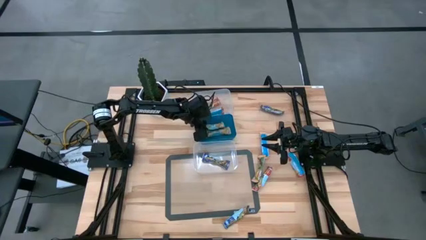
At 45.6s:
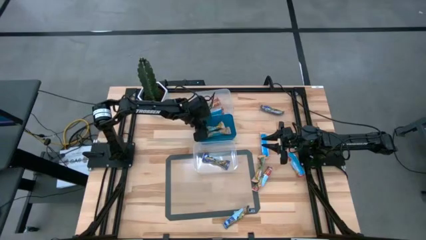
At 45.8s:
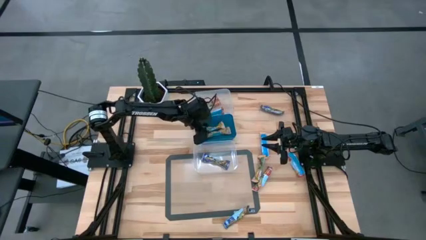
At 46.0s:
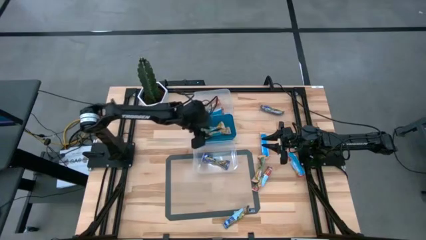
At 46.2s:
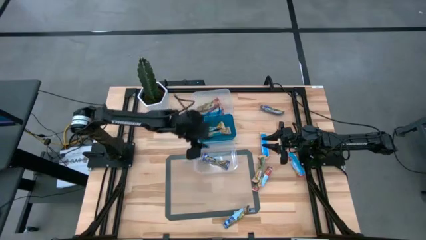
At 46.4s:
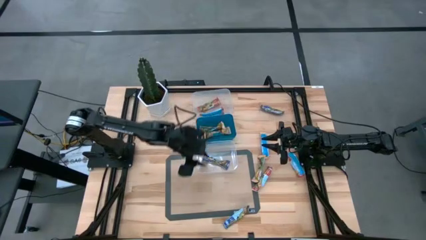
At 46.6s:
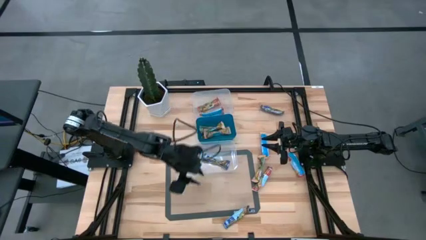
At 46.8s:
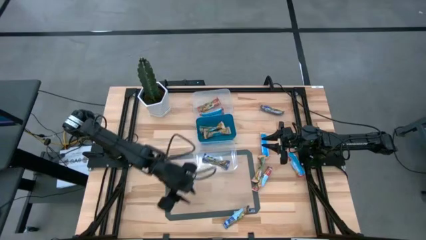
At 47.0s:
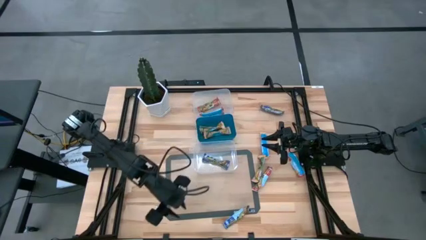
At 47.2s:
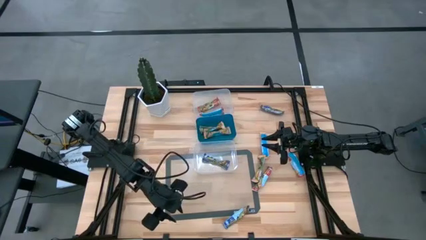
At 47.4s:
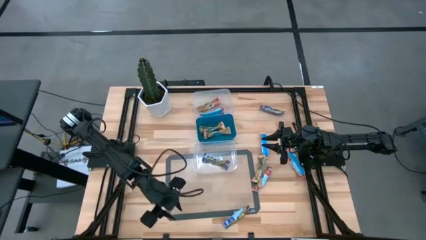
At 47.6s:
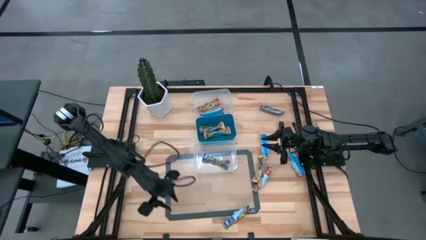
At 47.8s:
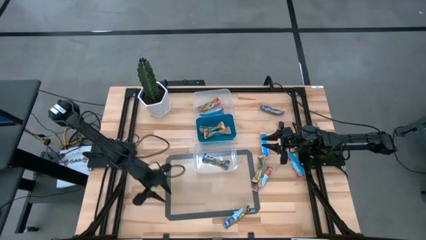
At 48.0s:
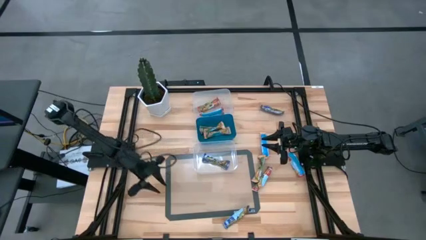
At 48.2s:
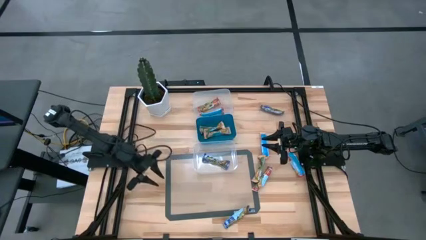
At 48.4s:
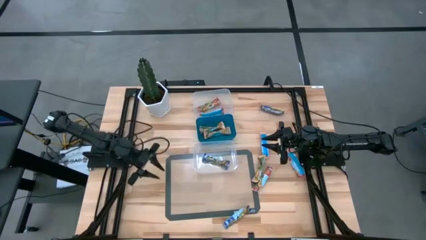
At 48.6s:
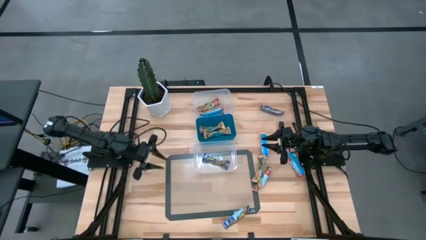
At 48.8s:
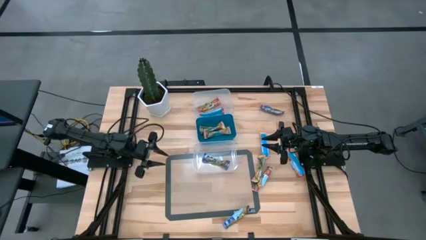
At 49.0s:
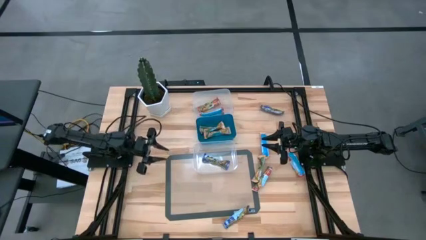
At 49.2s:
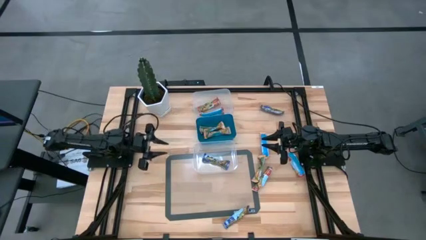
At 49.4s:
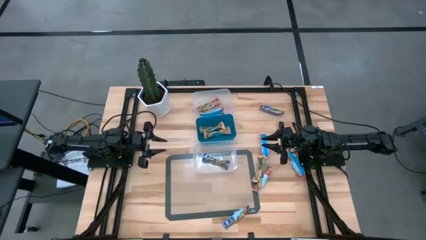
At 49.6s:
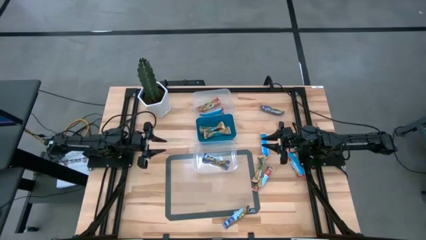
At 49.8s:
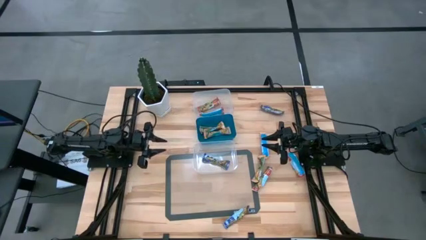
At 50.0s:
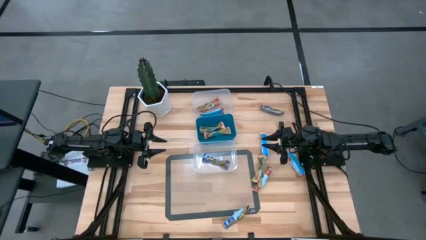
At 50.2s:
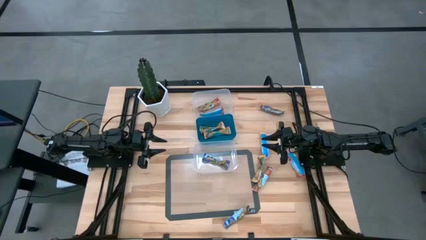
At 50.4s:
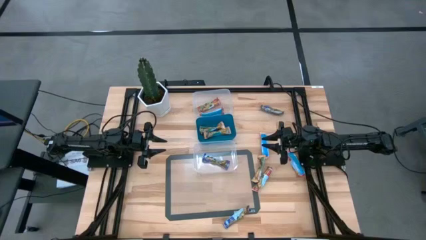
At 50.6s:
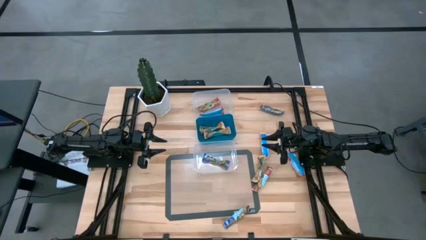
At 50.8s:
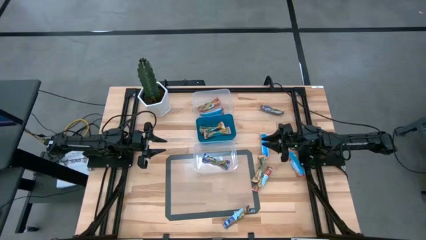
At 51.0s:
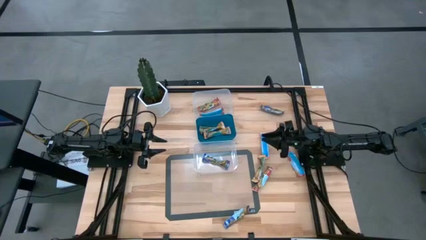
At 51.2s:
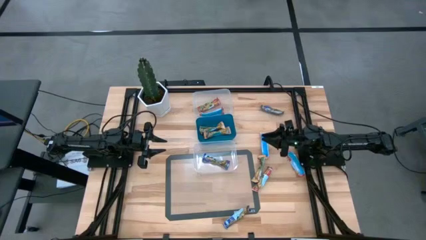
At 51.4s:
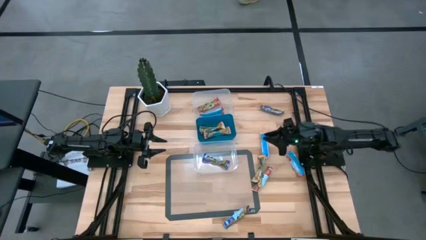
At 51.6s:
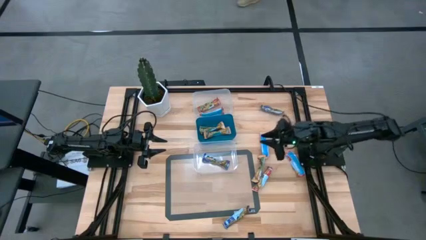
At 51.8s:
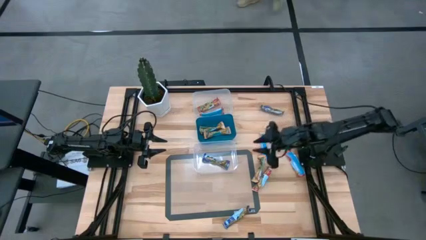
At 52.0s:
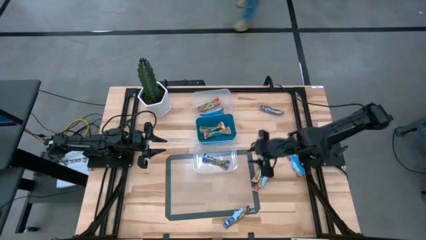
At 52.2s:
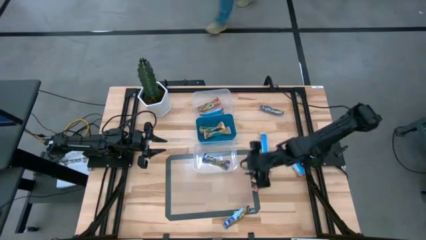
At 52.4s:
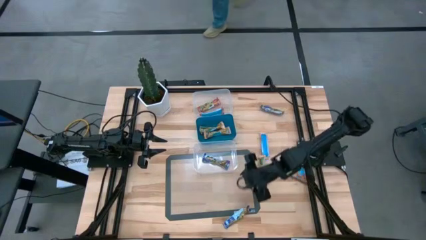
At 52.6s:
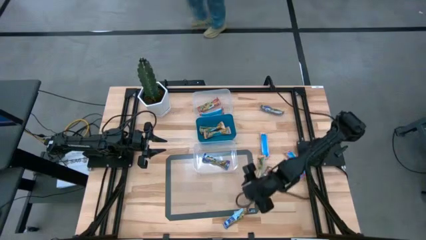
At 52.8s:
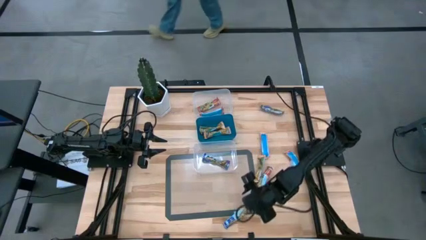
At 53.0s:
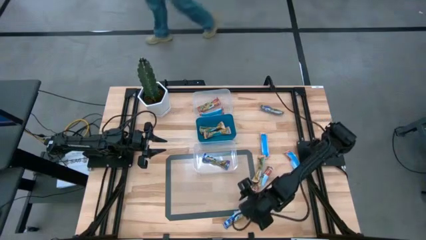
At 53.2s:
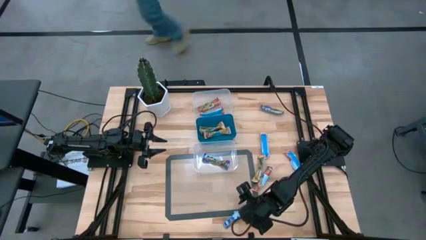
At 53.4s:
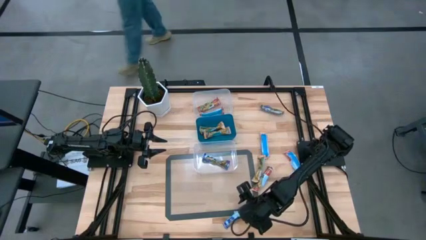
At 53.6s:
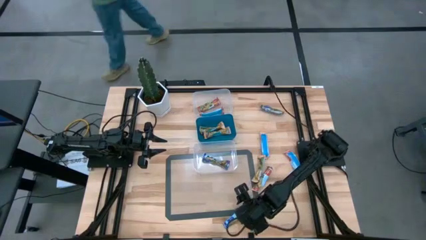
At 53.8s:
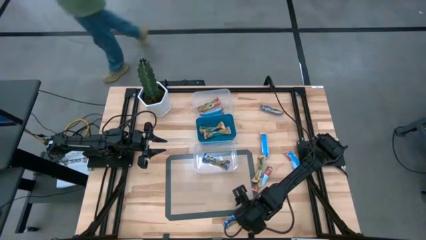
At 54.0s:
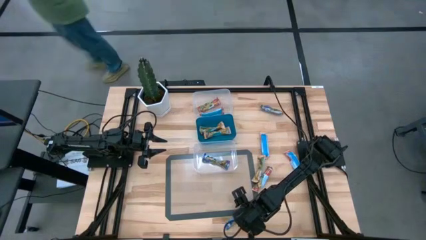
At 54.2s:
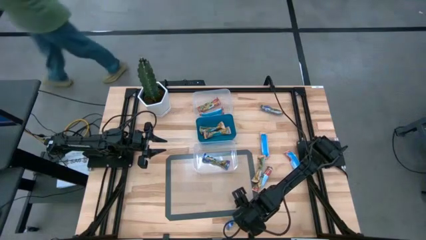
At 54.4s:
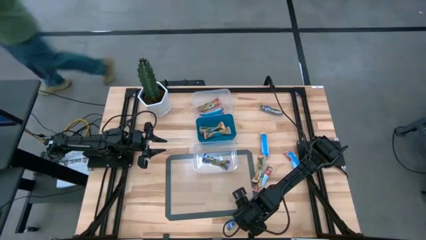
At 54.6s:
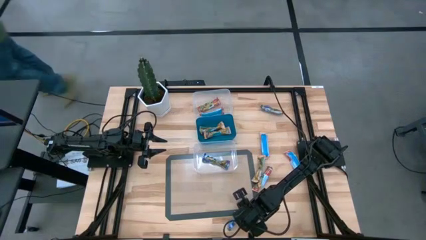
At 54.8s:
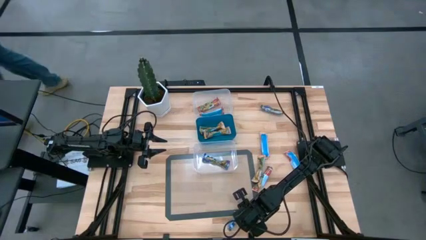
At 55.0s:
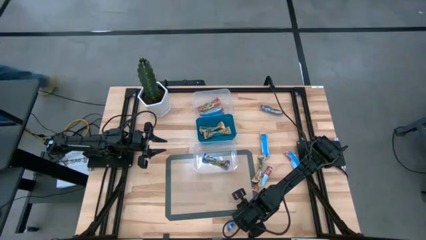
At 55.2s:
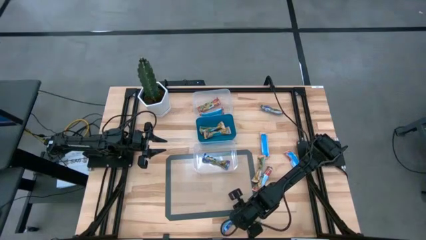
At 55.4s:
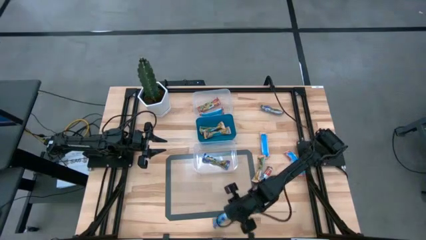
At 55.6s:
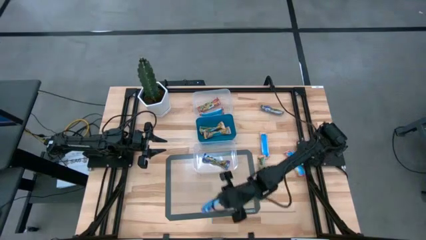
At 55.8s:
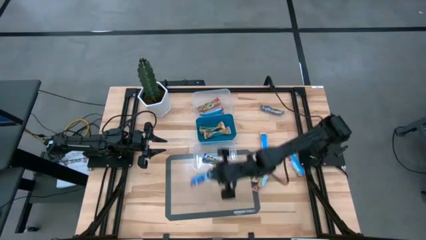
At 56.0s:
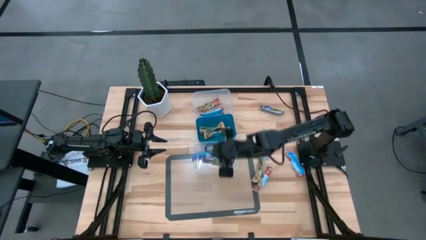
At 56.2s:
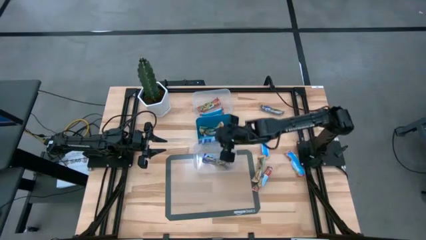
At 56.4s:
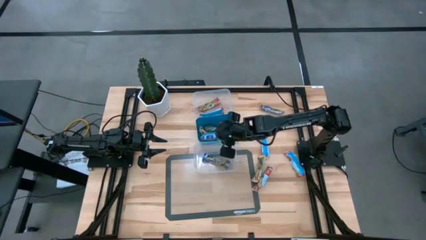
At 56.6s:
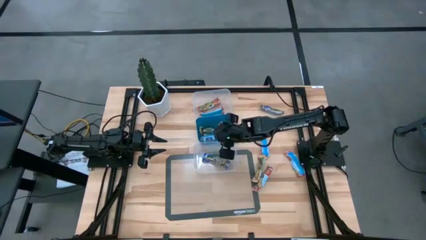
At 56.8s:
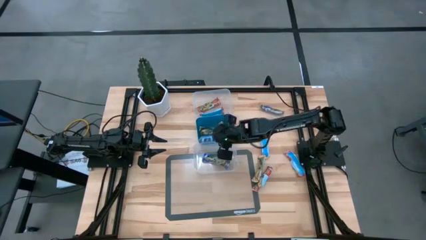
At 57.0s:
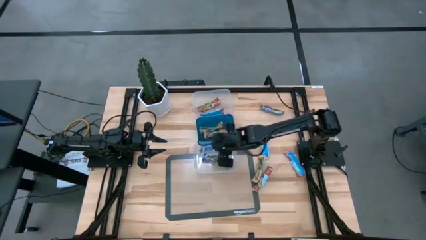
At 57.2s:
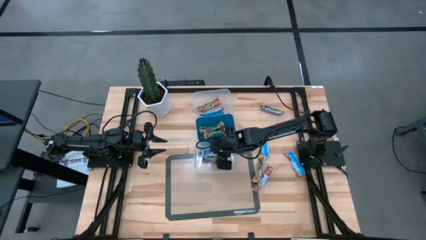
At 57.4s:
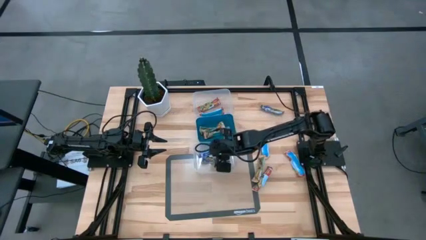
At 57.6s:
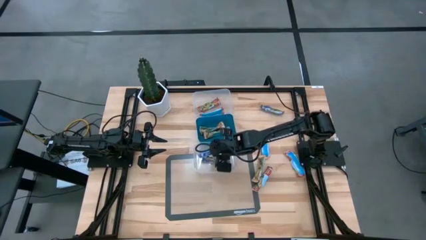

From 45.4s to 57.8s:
Task: Pick and place Granola Bars by type
Put the blue granola bar into the bottom transparent bin

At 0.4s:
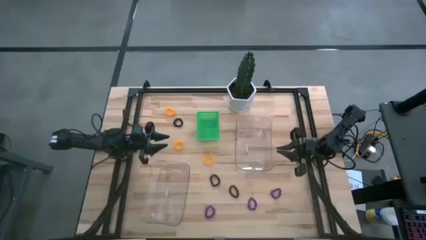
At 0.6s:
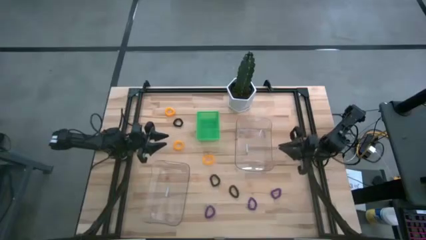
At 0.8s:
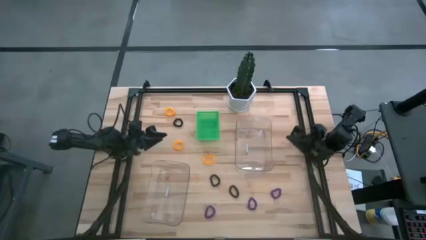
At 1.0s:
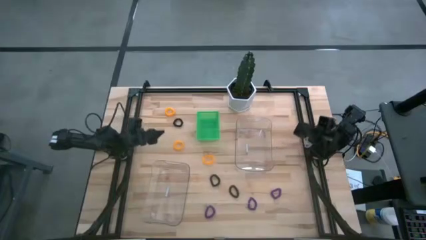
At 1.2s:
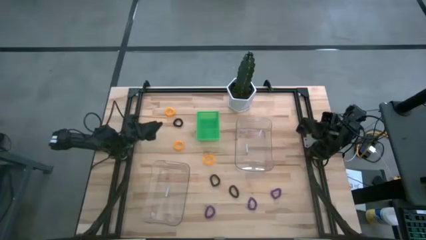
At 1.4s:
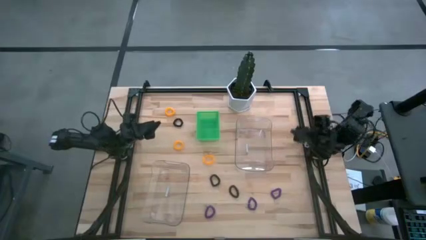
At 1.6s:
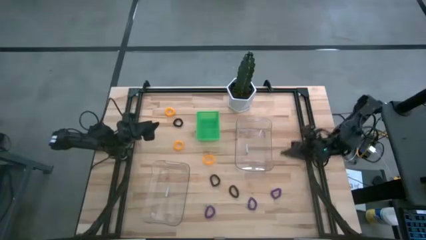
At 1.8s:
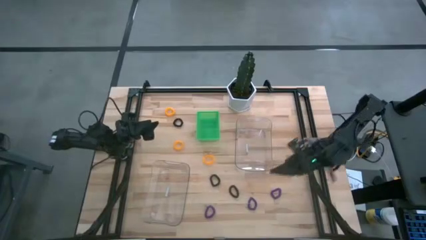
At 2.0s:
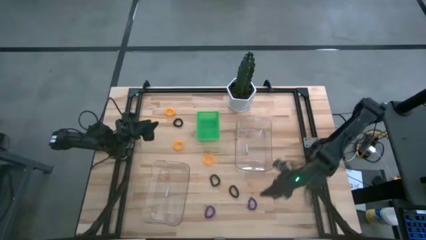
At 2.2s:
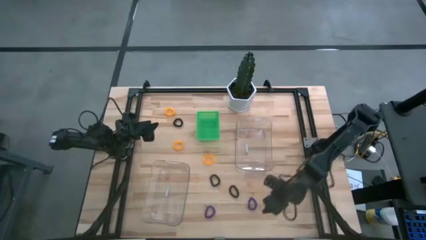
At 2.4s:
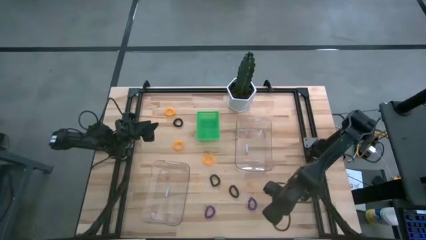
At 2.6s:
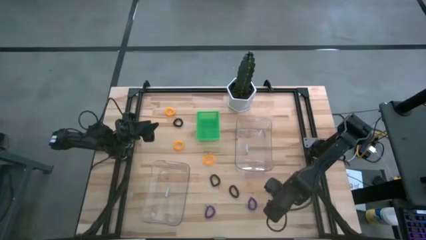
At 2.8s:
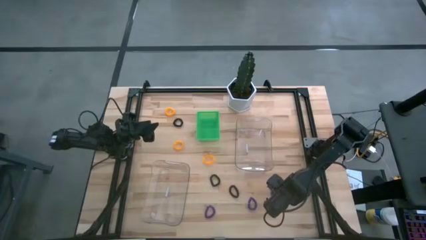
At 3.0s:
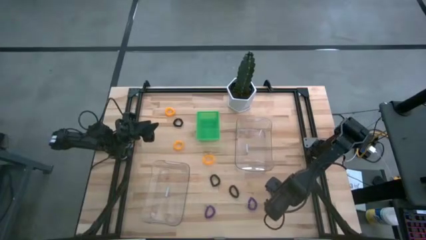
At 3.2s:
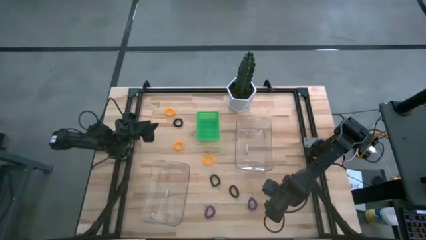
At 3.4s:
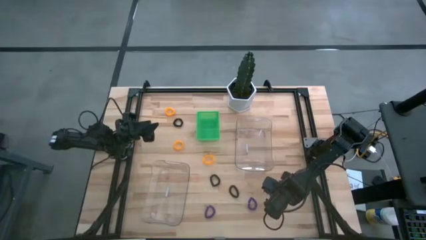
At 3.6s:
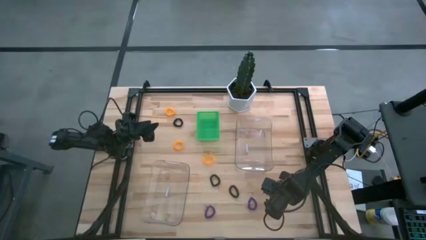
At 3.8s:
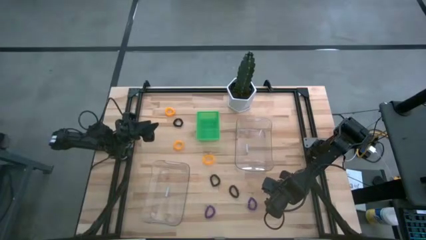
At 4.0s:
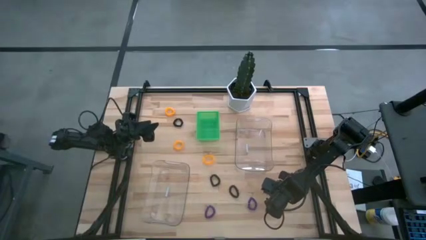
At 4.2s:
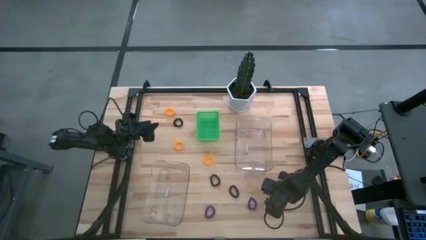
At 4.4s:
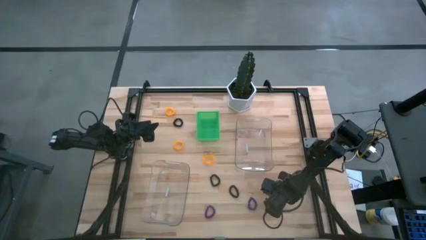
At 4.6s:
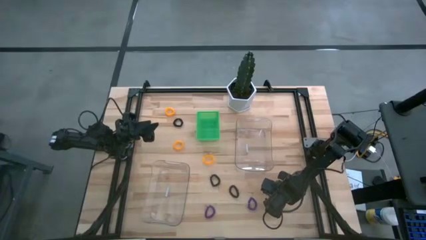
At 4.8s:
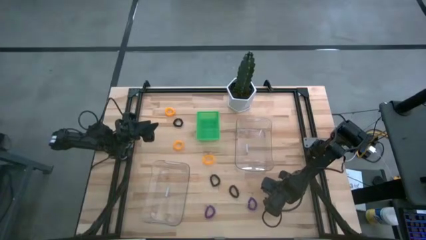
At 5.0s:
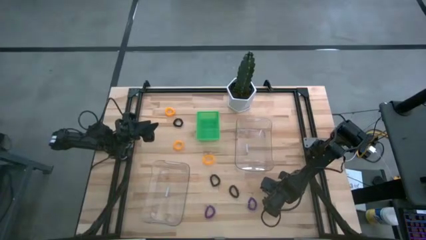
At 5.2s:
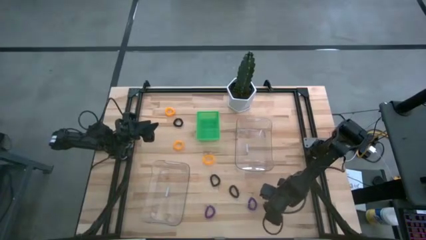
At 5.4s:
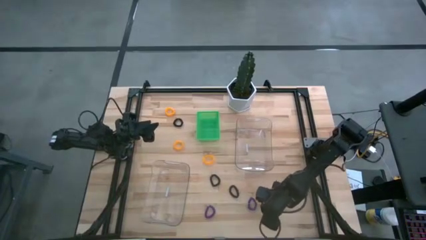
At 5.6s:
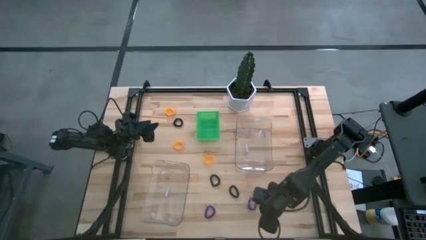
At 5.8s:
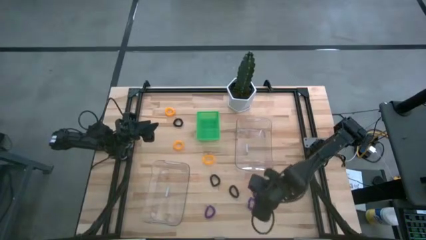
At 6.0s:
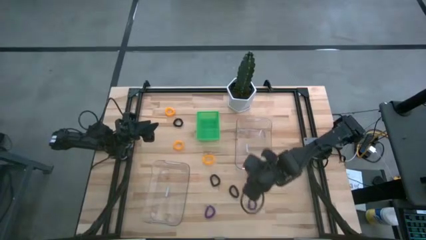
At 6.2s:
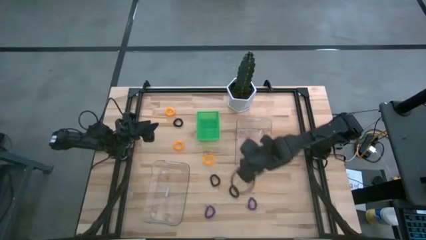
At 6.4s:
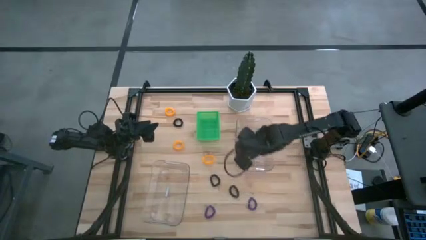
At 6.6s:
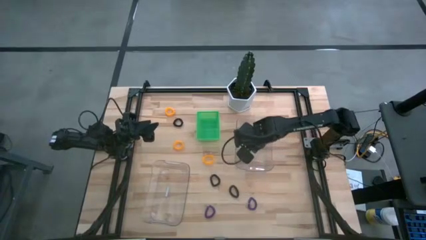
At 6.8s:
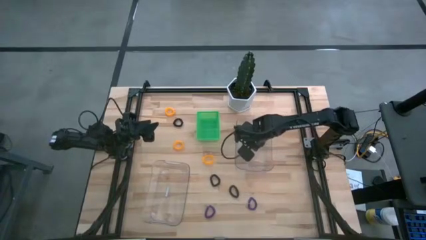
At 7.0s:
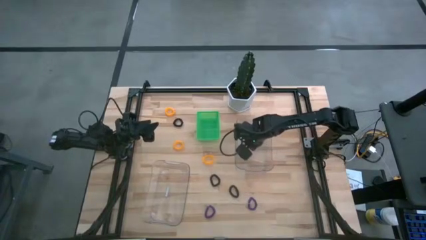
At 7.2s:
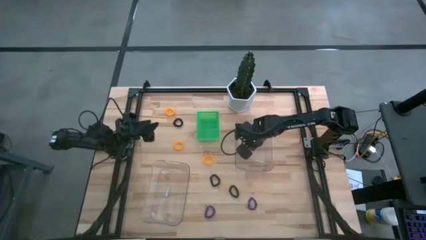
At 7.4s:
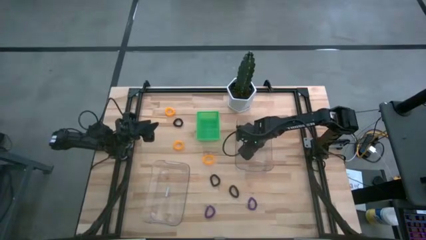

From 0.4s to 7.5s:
Task: Sort spring keychains
Put the purple spring keychain into the top transparent bin
